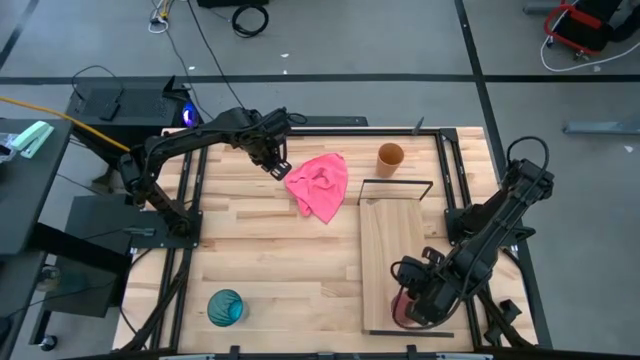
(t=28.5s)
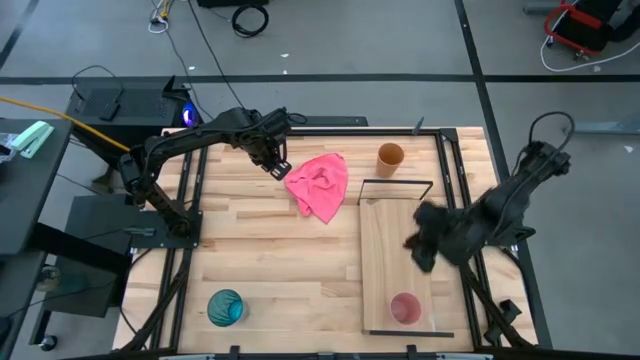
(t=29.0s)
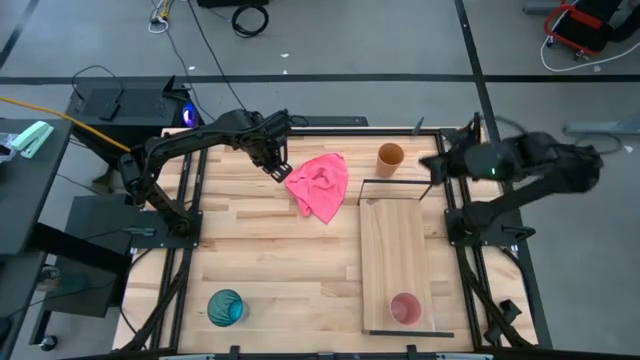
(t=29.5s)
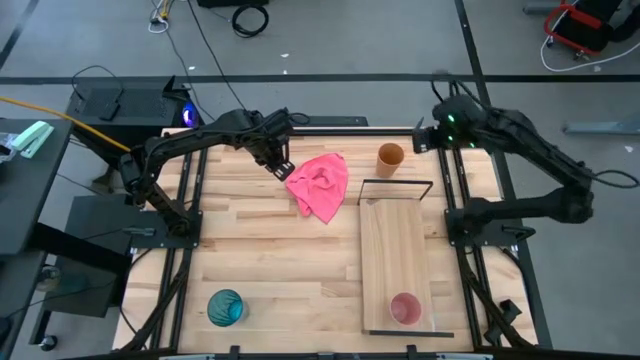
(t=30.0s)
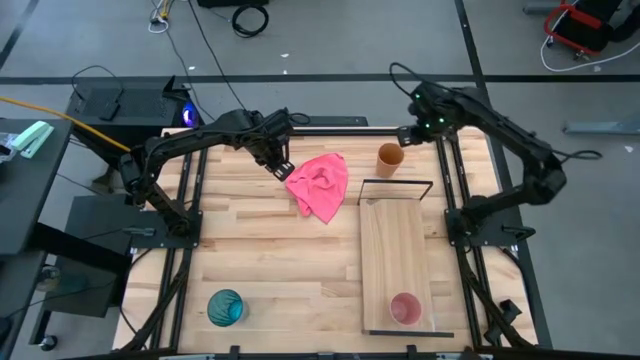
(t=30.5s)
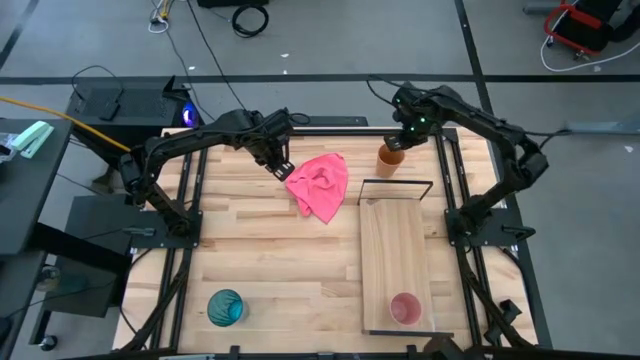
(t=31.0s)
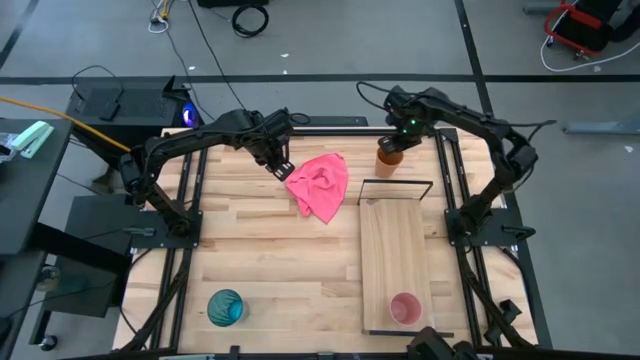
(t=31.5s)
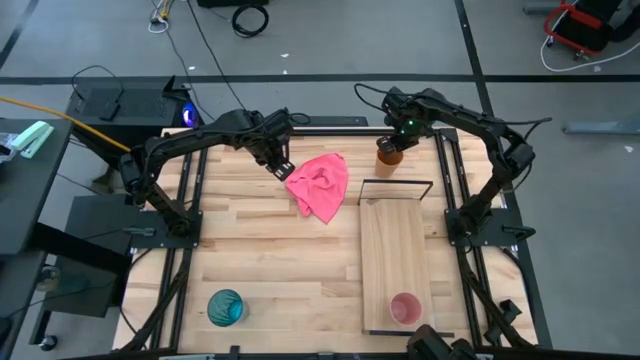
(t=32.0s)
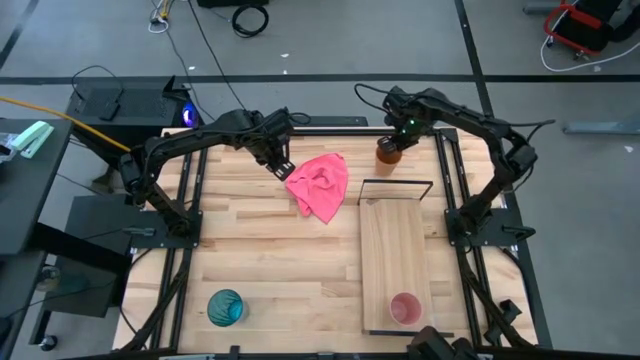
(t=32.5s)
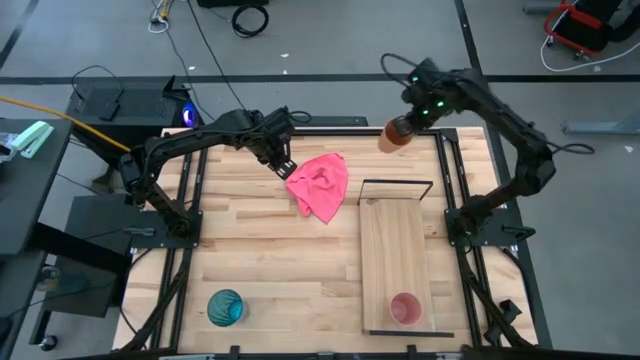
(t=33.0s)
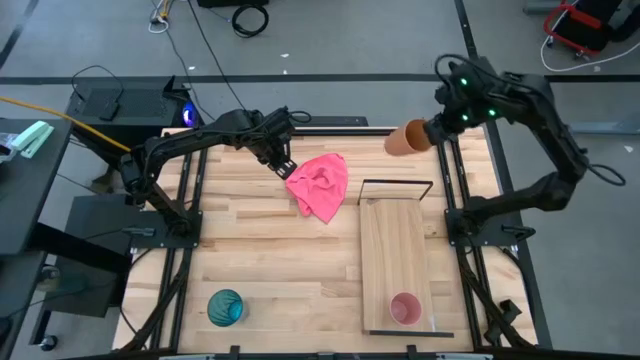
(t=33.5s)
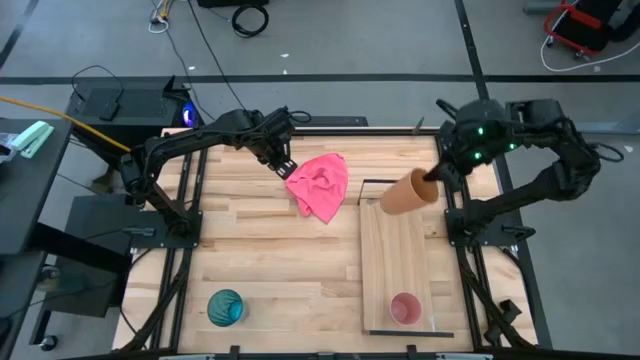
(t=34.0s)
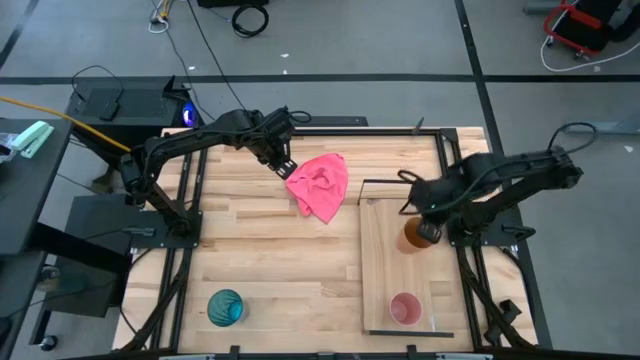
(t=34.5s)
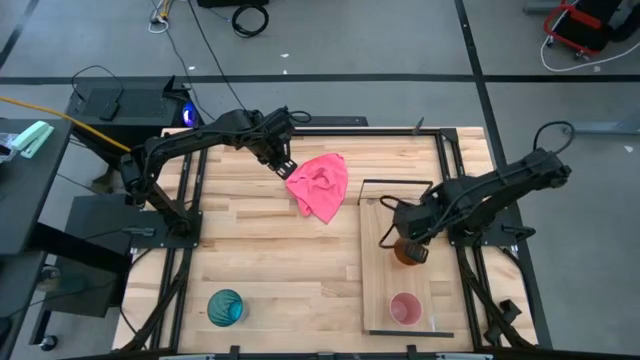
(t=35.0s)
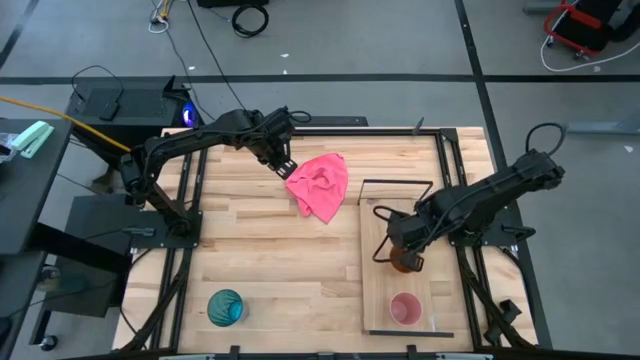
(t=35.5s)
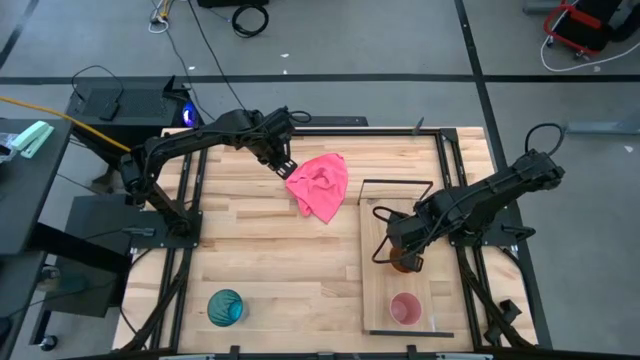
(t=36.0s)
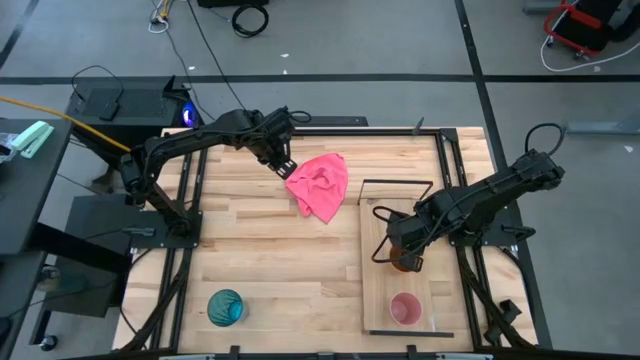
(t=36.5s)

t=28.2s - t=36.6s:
Task: Stack small to large cups/mugs on shelf
Put the orange cup on the shelf

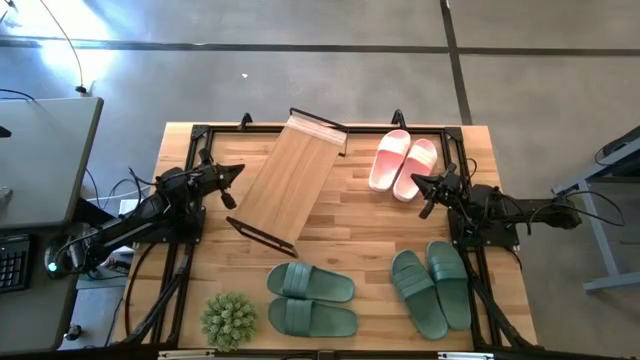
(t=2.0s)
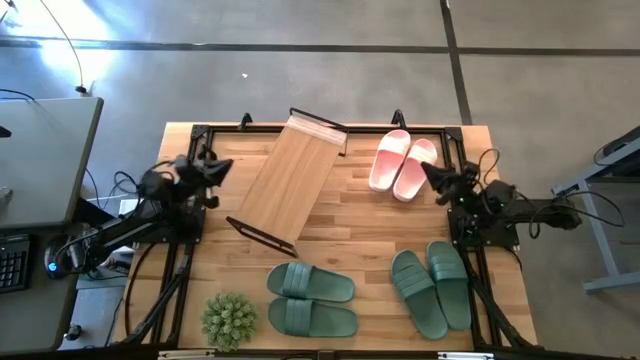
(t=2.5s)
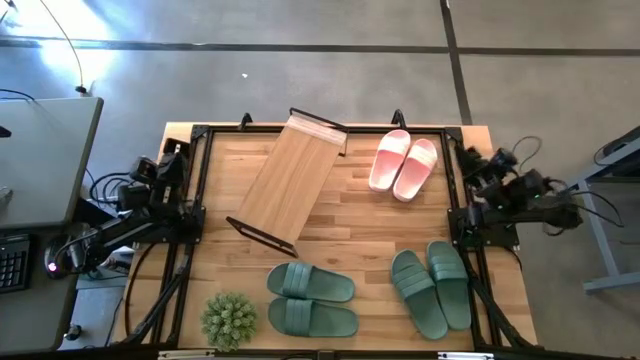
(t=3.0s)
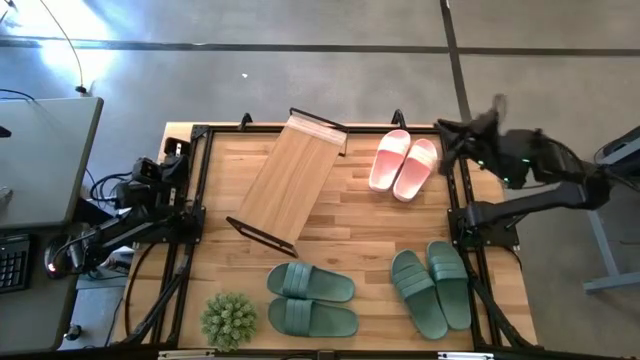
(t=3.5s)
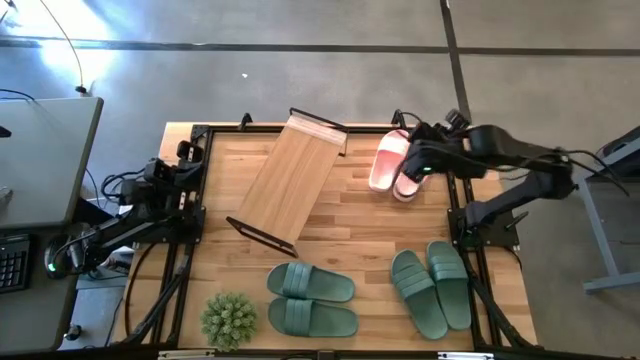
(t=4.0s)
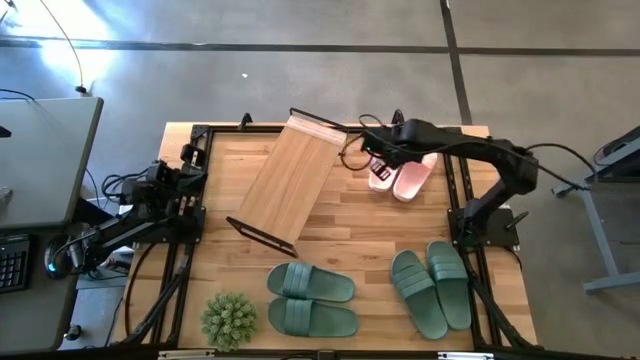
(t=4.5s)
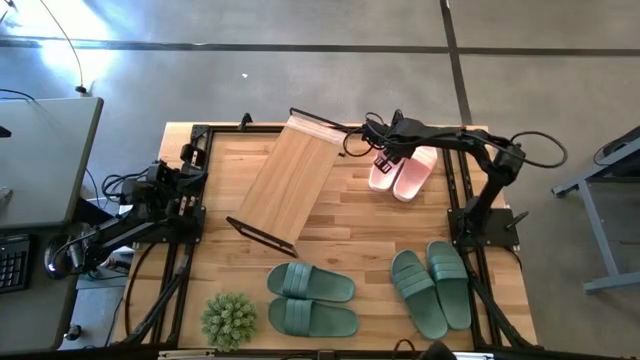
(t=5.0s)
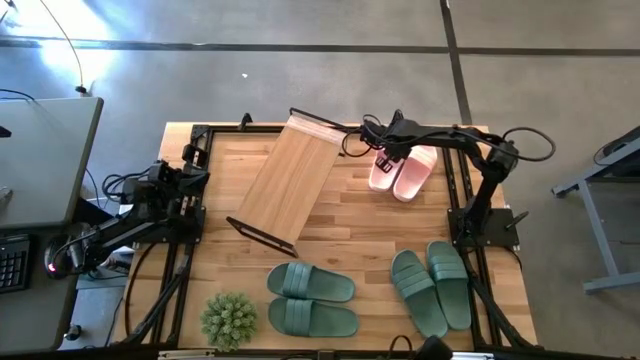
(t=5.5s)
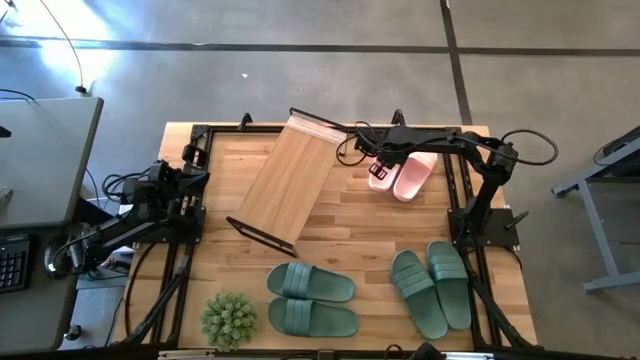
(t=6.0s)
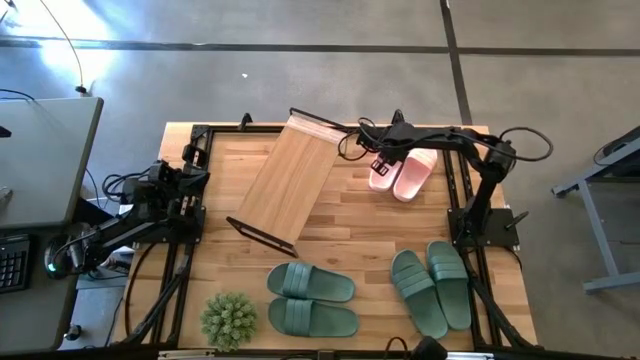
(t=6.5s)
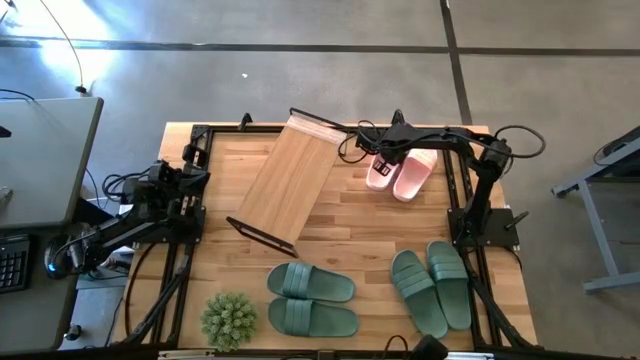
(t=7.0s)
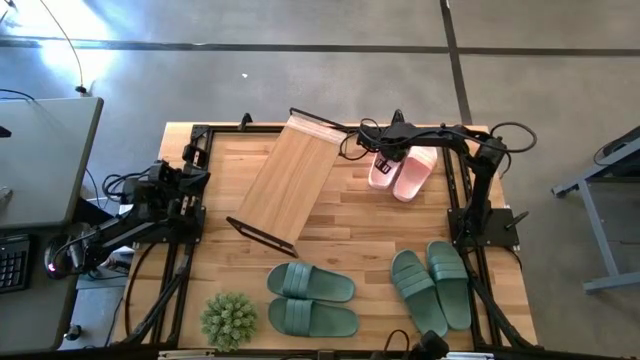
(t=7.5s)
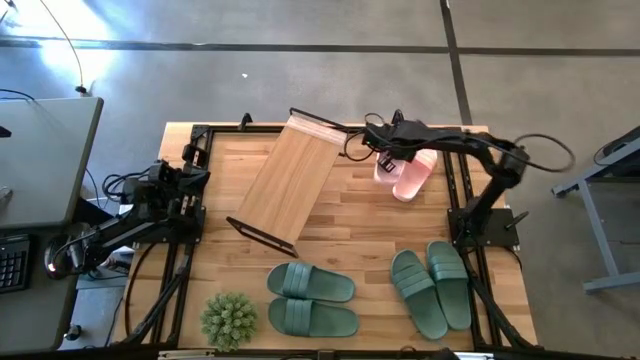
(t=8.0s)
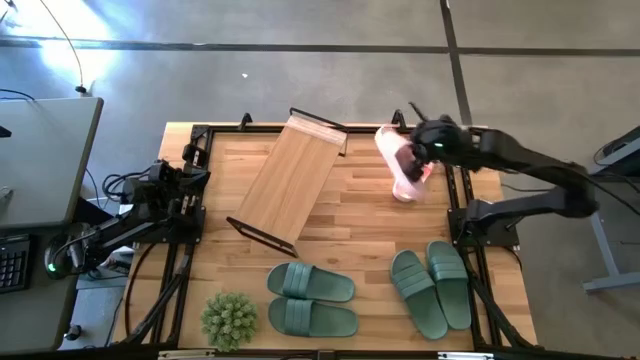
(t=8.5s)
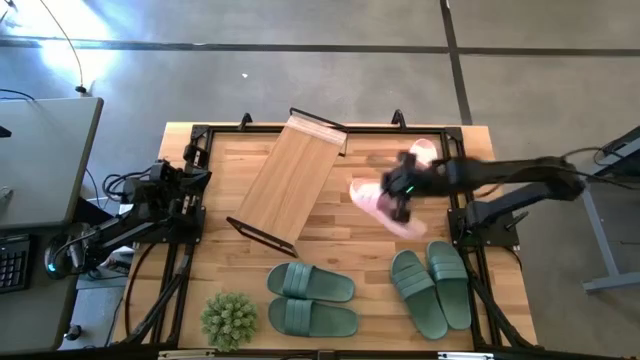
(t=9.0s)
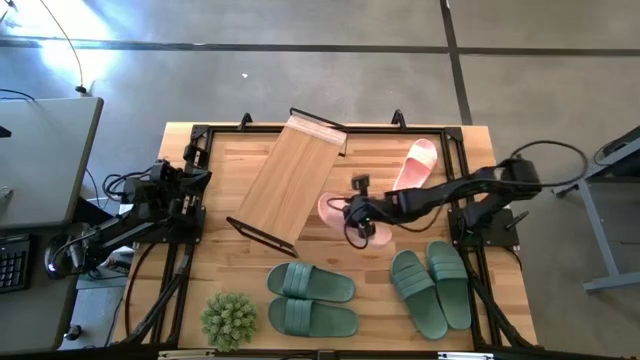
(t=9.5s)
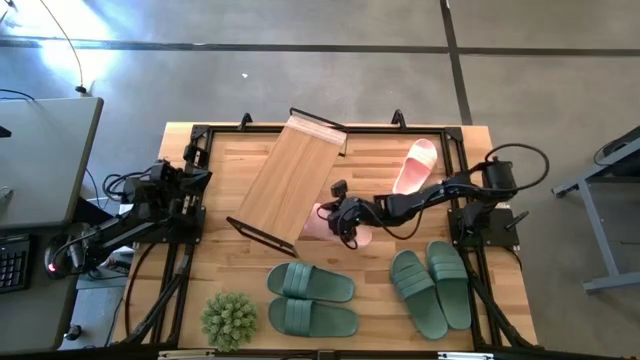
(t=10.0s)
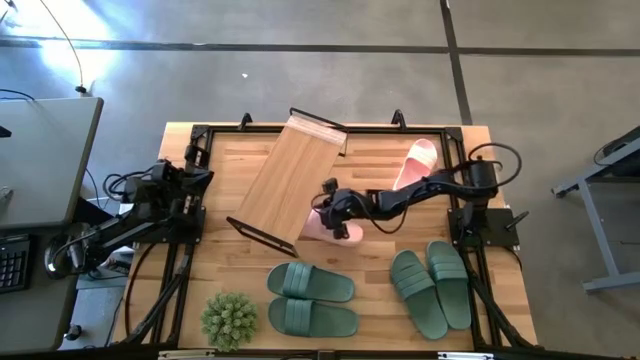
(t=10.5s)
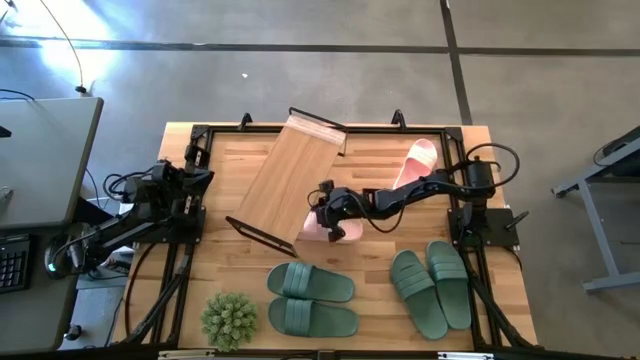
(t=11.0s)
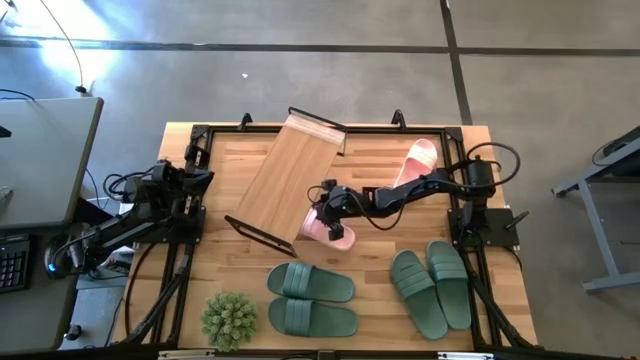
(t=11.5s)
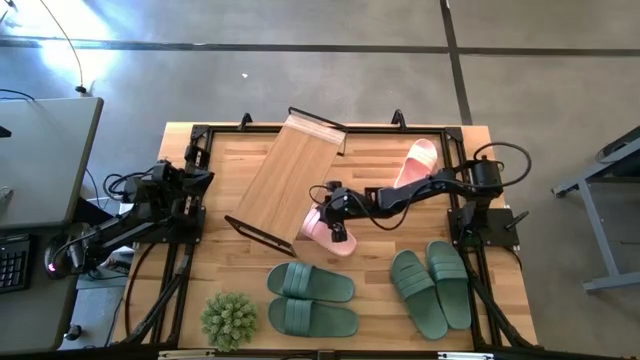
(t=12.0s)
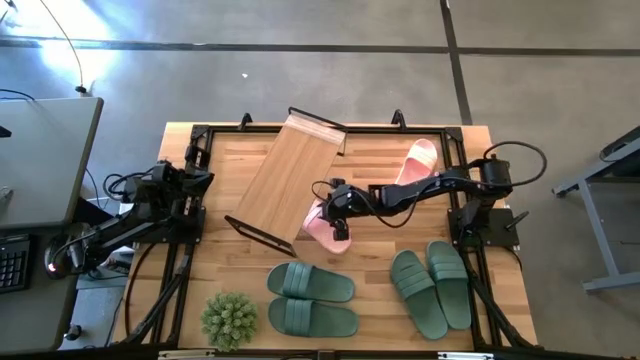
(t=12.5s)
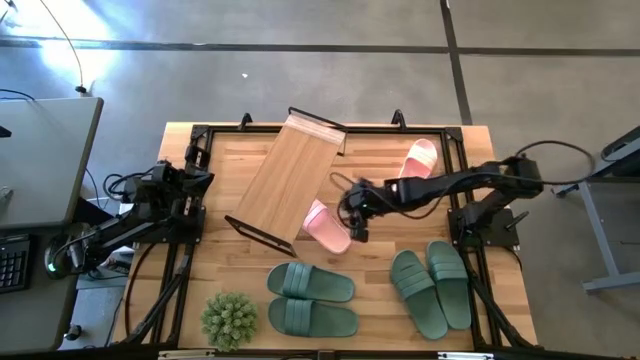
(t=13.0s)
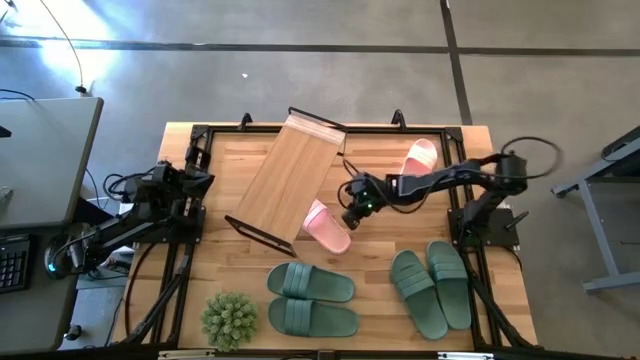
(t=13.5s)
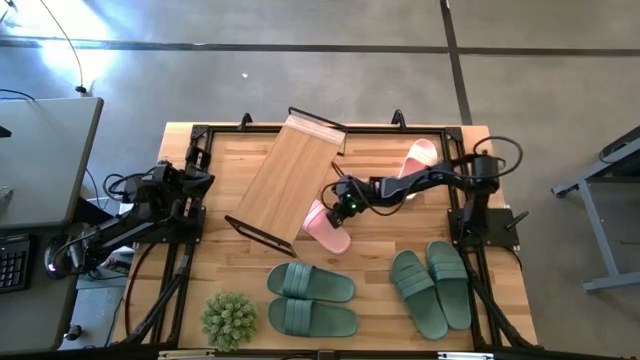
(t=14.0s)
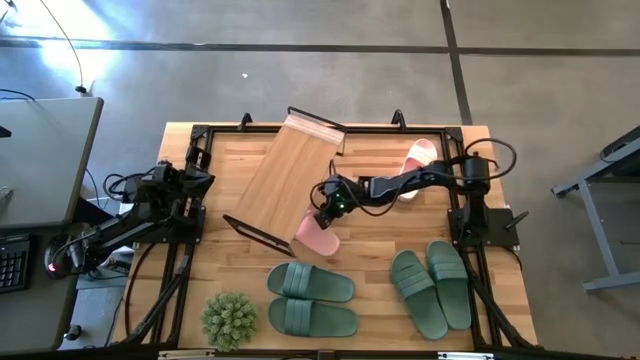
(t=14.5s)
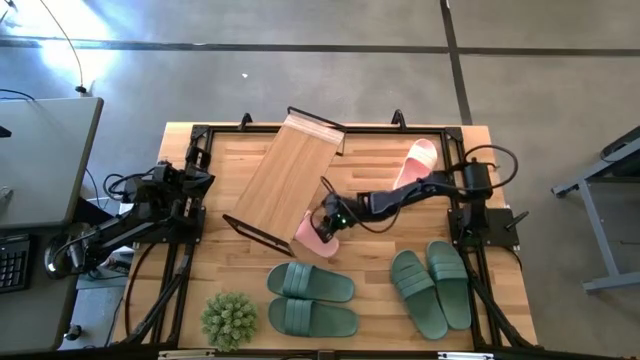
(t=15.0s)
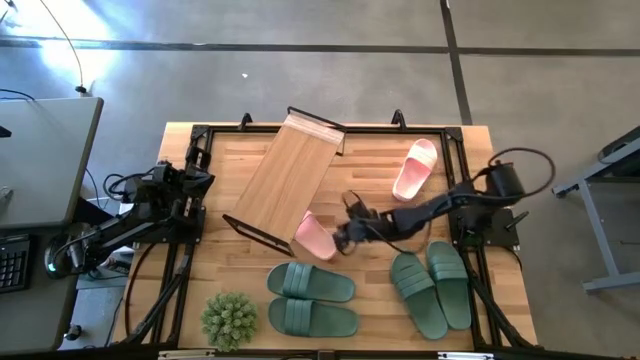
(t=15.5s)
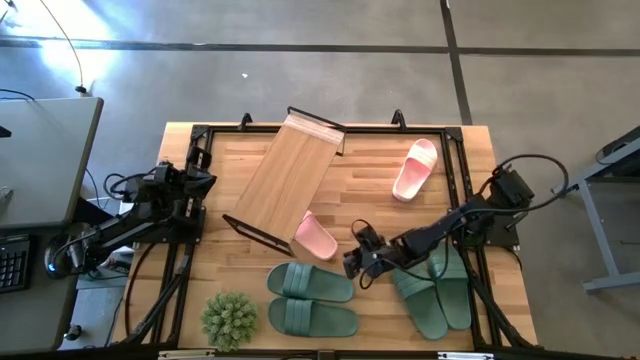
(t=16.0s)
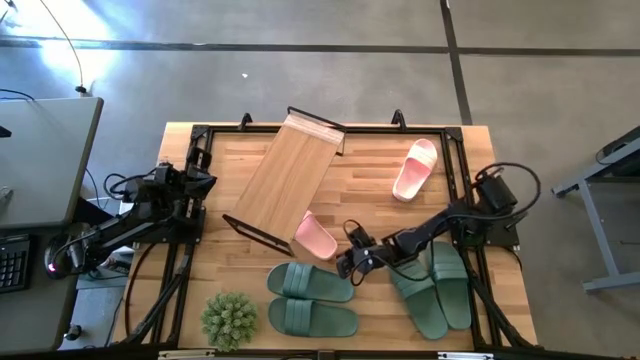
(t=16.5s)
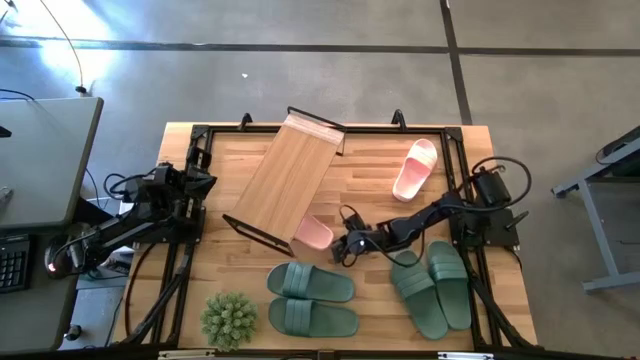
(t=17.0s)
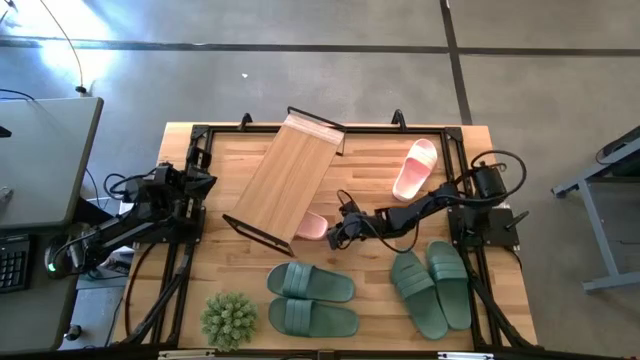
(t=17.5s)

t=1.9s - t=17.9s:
Task: Pick and place slides into the shelf
Put the pink slide under the shelf
